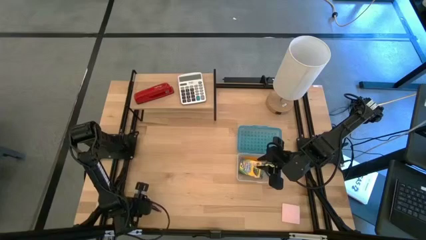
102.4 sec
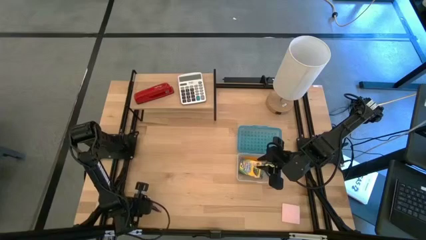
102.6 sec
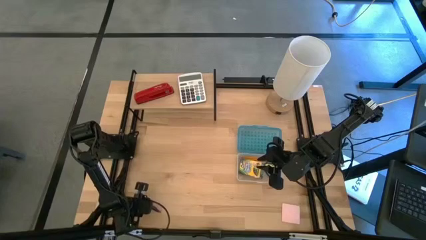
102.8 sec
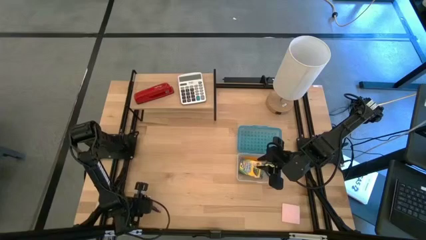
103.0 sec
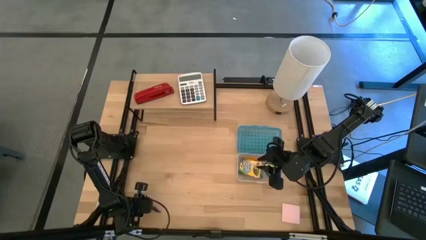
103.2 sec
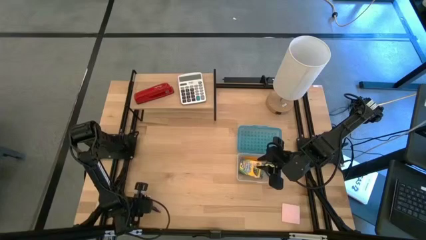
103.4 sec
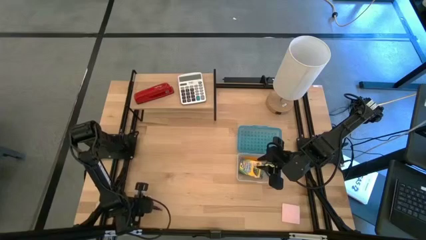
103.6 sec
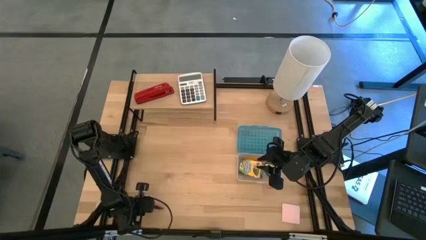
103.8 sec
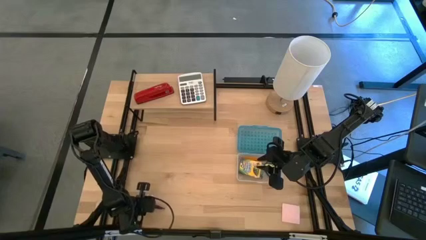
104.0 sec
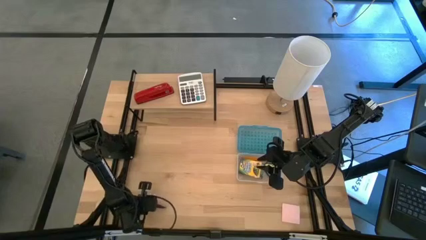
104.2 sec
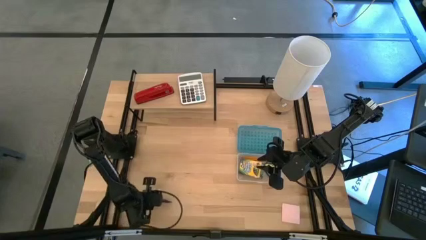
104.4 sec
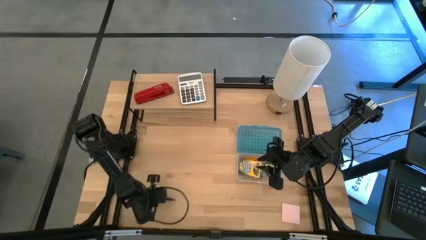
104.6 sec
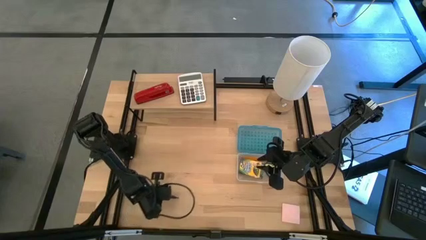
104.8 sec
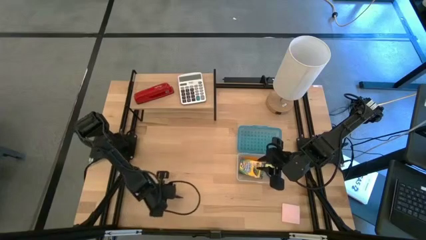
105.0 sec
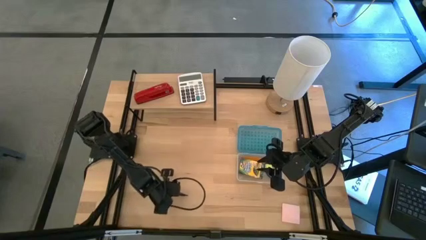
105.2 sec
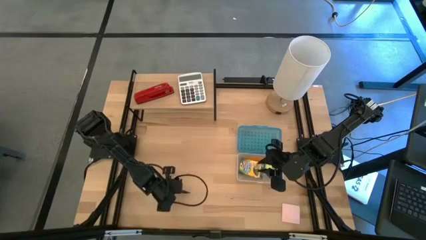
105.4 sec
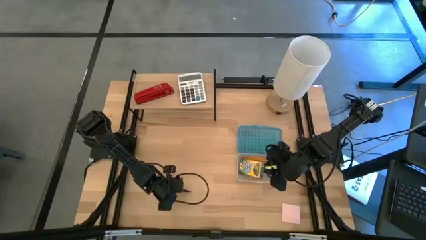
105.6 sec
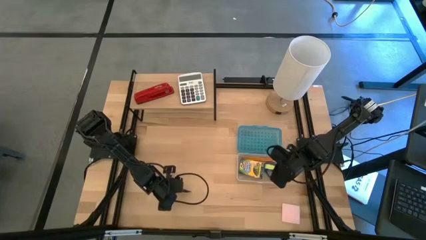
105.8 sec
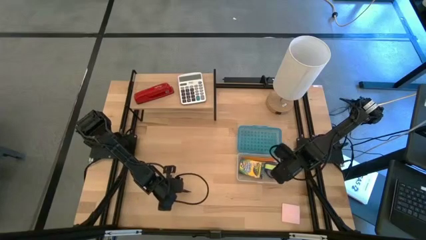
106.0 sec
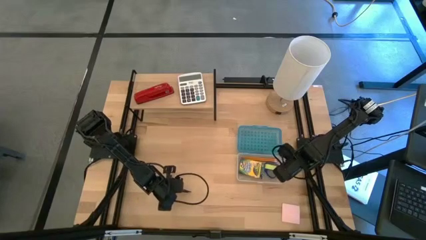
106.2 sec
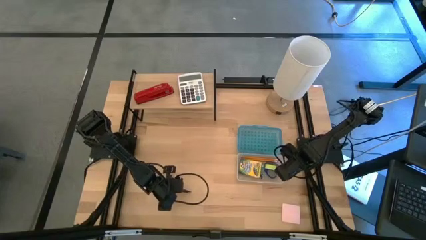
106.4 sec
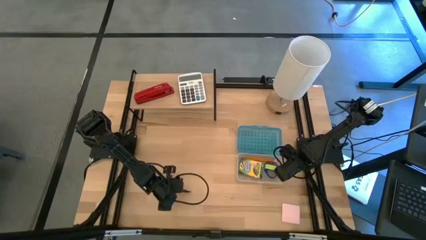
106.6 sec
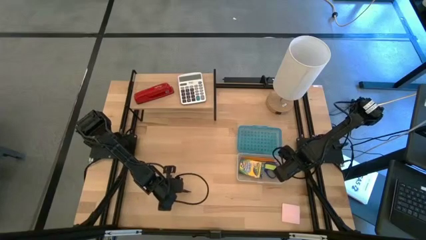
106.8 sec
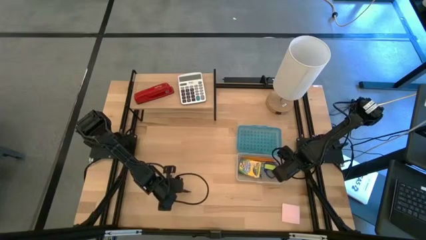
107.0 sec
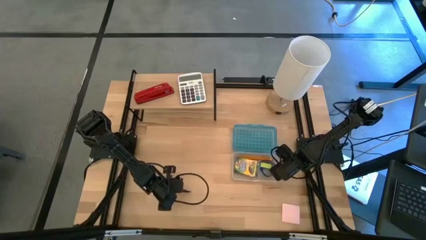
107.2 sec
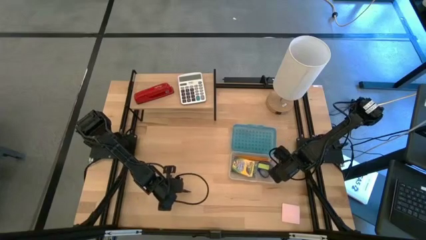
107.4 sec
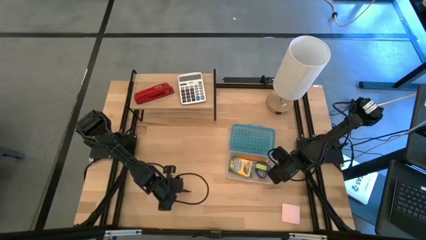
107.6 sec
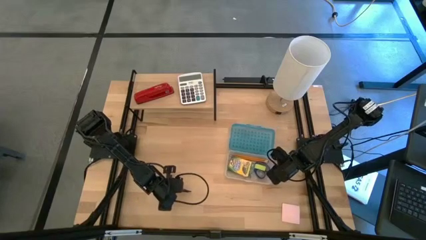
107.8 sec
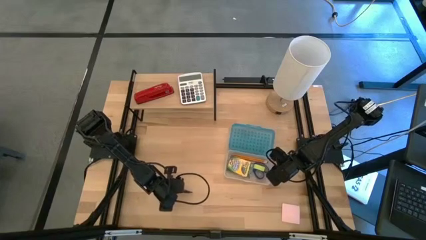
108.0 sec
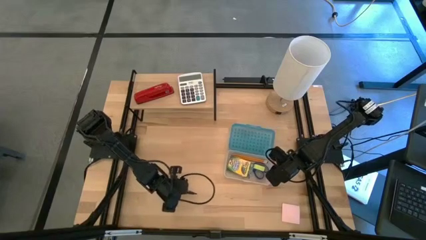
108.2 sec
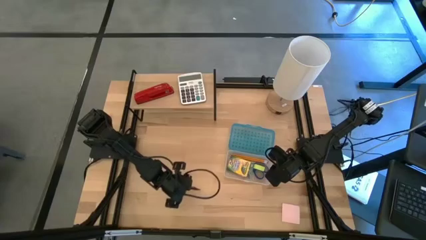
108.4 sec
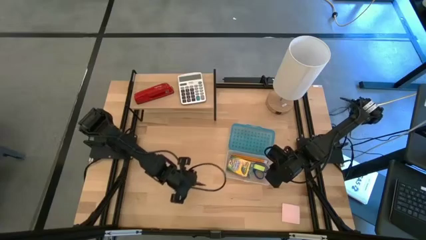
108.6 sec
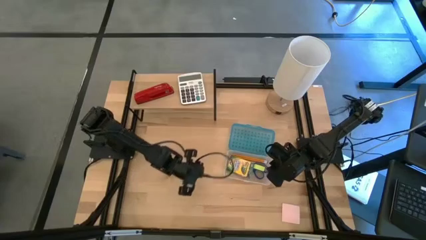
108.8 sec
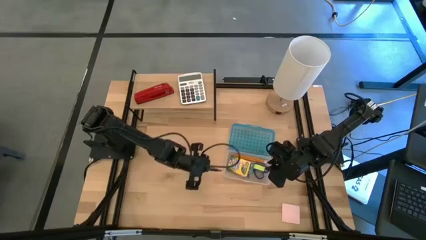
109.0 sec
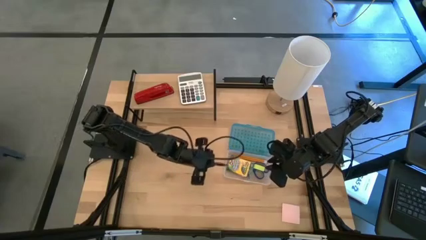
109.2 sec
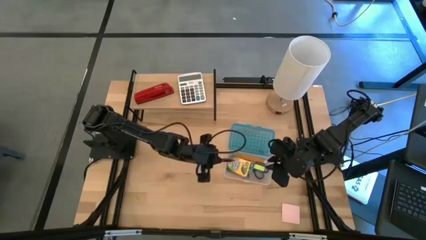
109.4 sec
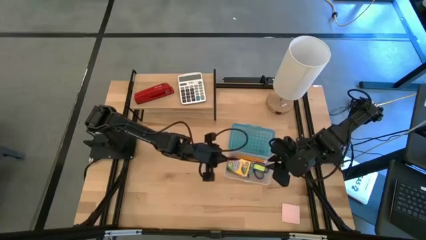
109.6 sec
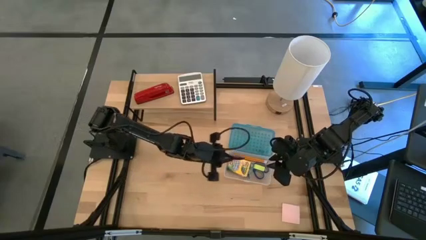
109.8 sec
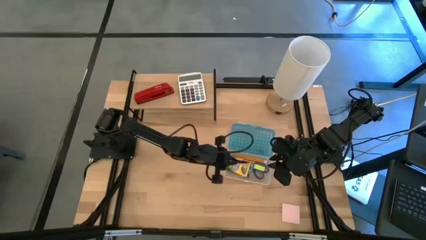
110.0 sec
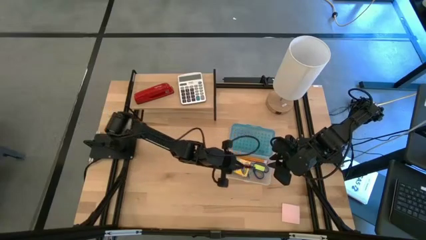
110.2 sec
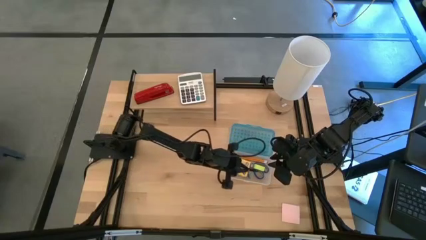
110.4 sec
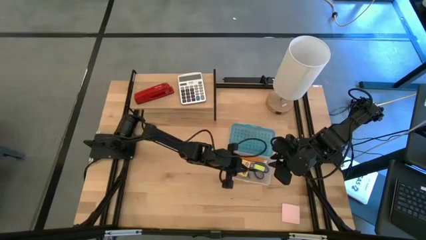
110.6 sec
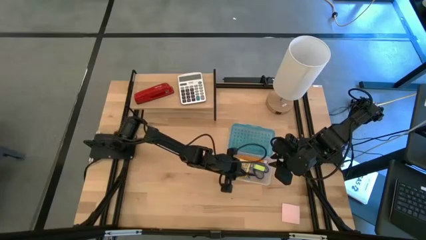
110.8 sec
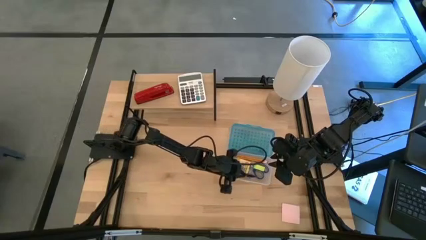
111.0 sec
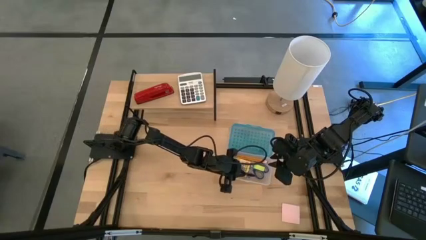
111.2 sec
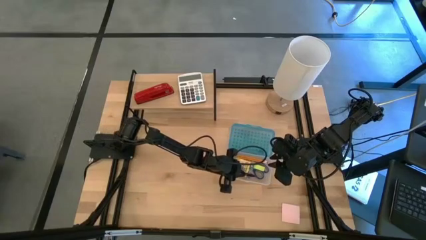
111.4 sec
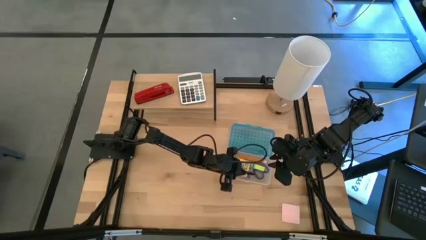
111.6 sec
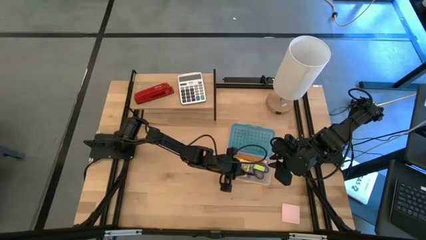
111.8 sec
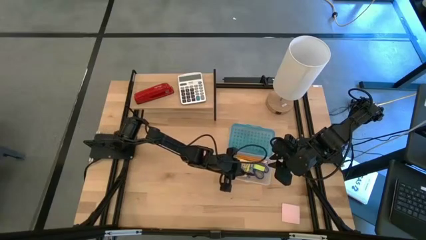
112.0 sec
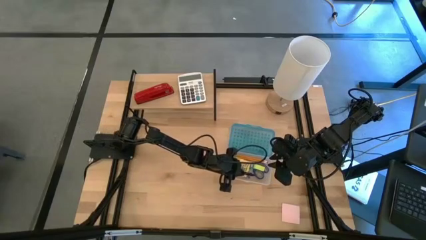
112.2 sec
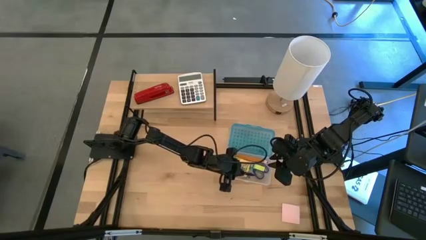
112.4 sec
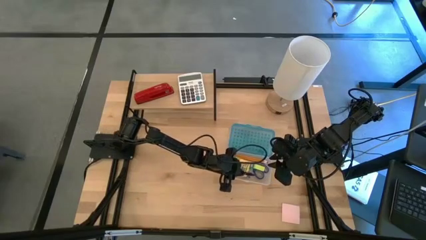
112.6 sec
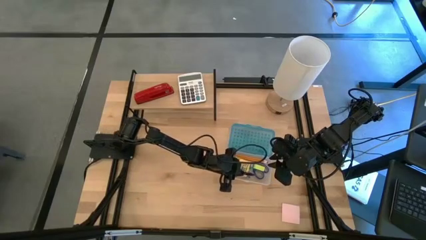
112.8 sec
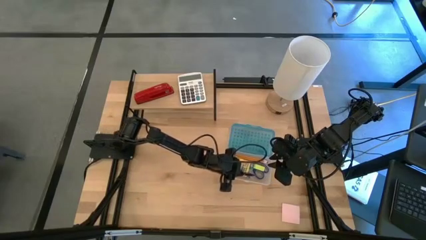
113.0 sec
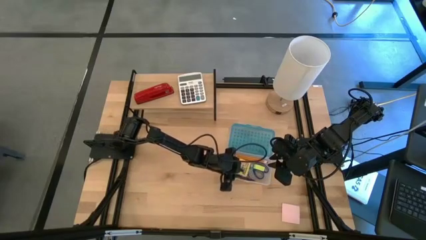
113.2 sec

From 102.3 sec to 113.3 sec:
Task: Pack school essentials
Put the purple pen into the blue supply box

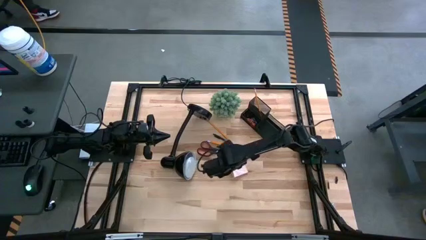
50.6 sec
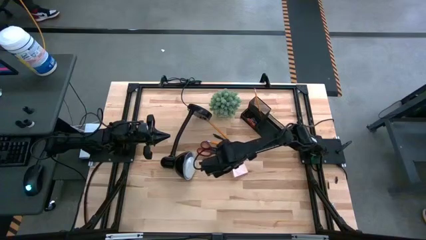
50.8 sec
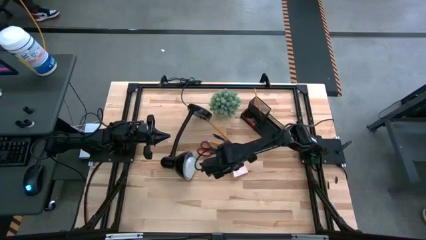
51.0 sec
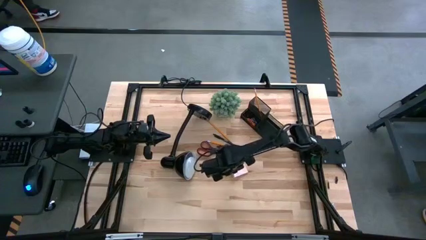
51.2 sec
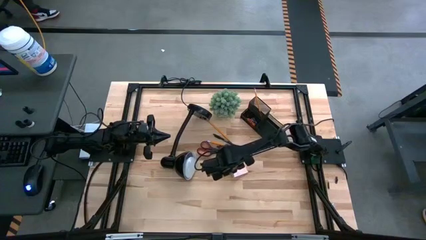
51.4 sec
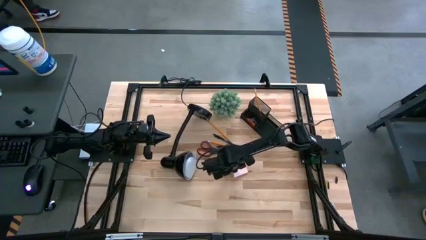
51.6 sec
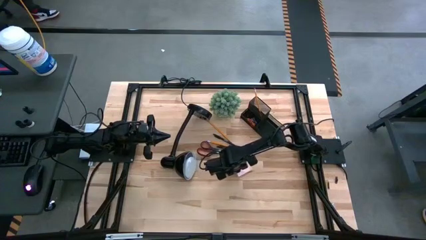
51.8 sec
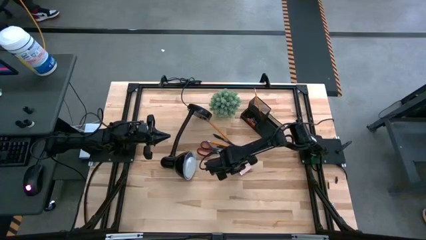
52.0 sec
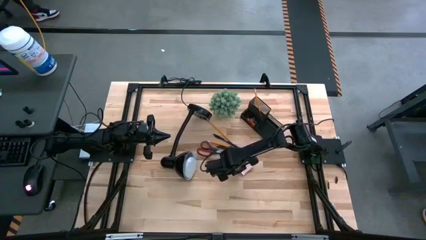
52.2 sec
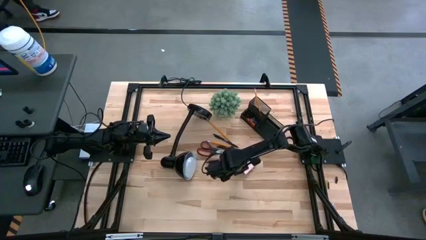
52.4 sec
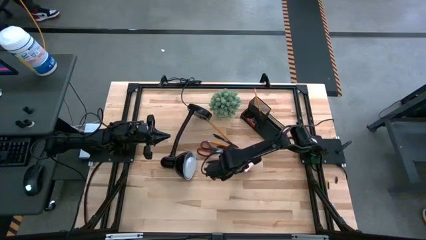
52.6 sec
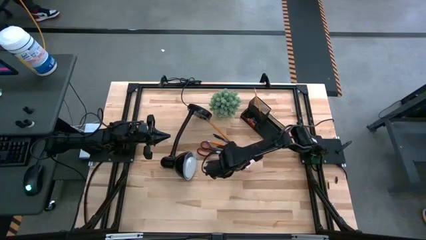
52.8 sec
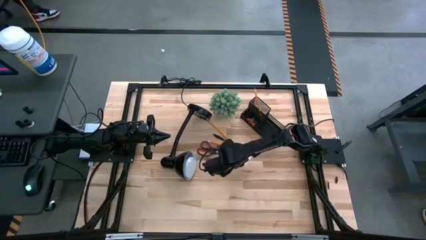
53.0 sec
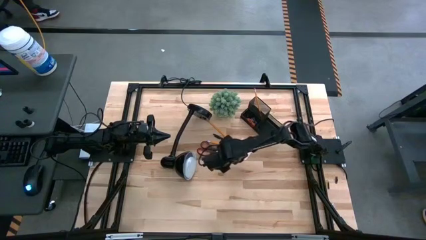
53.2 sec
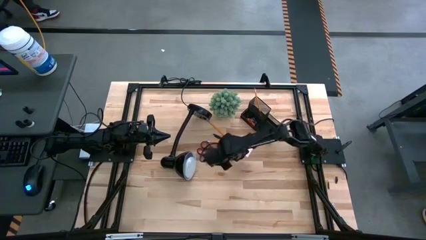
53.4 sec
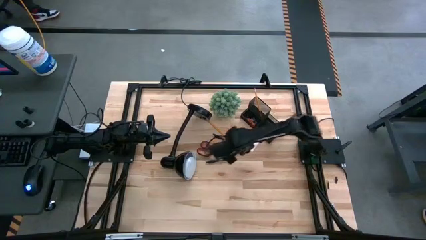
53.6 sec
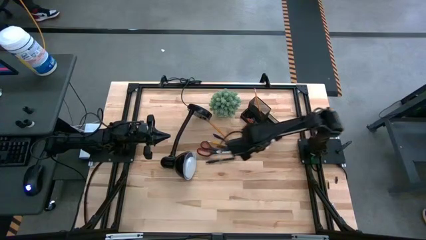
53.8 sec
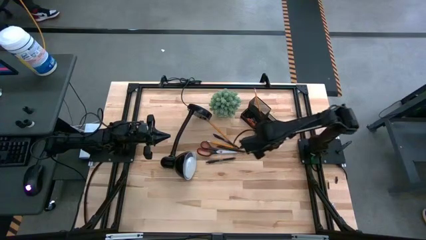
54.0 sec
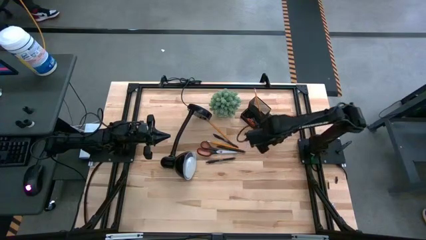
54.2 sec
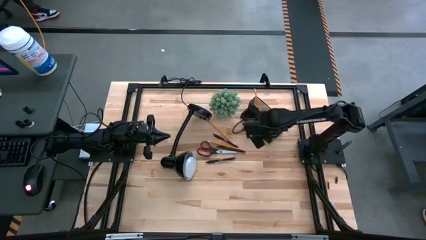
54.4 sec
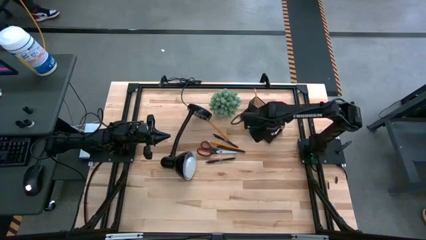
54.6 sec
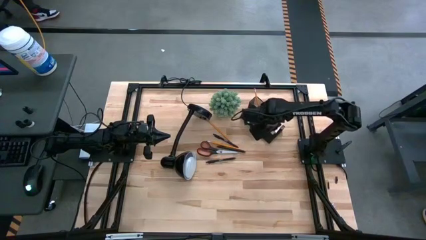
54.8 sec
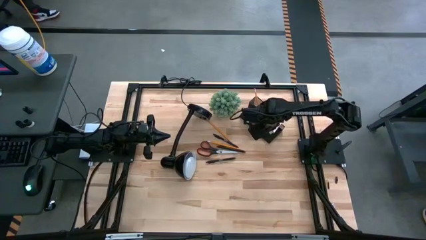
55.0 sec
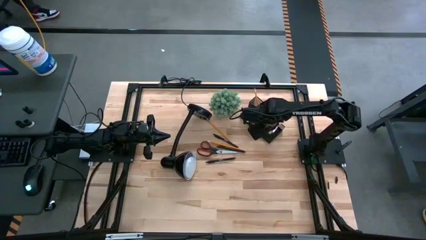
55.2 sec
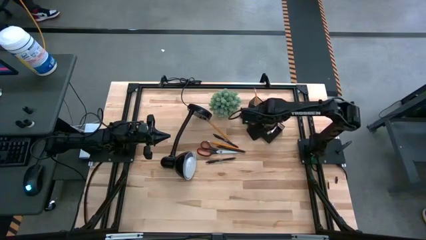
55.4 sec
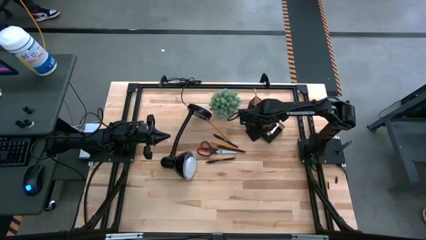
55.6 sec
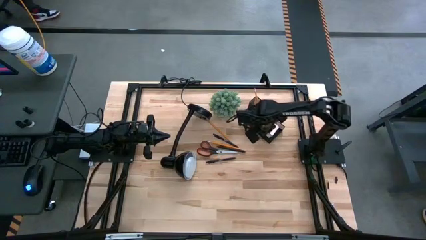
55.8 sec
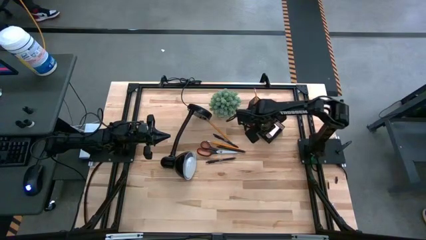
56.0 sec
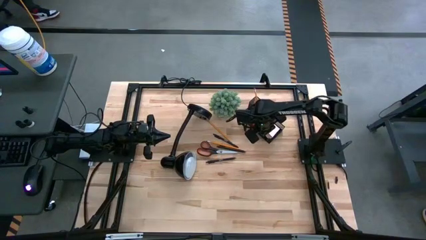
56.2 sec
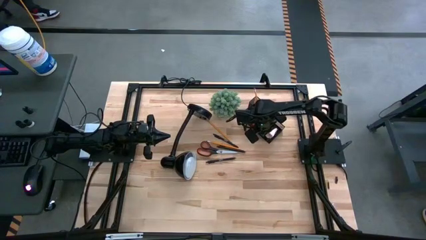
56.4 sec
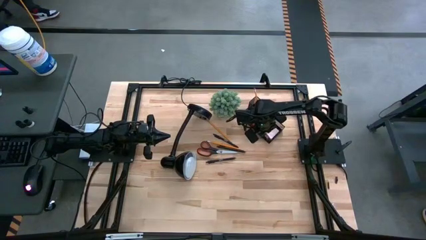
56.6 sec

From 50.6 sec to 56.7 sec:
Task: Pick and place office supplies into organizer
Put the sticky notes into the right section of the desk organizer
